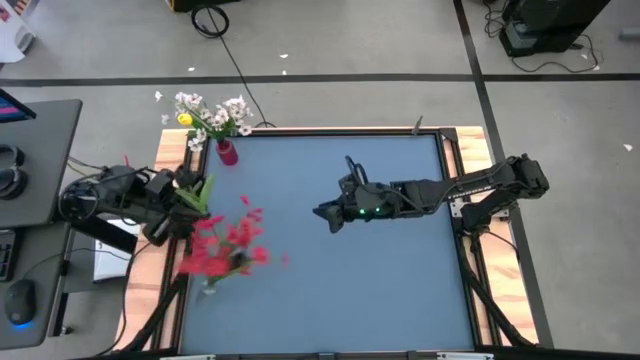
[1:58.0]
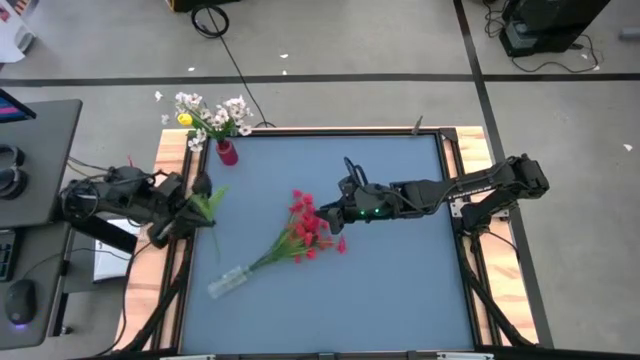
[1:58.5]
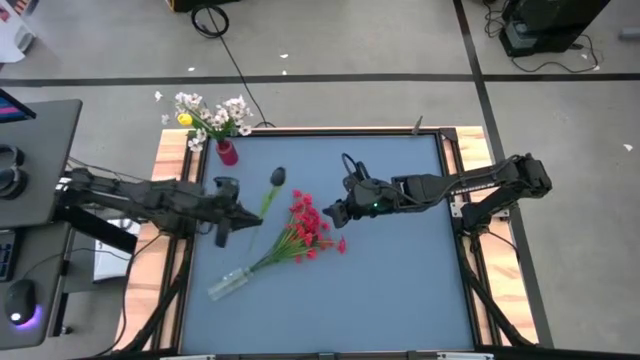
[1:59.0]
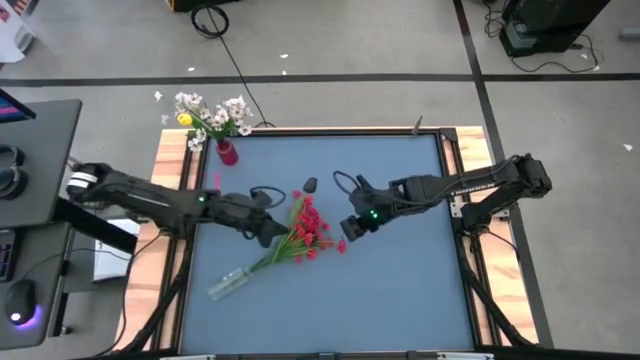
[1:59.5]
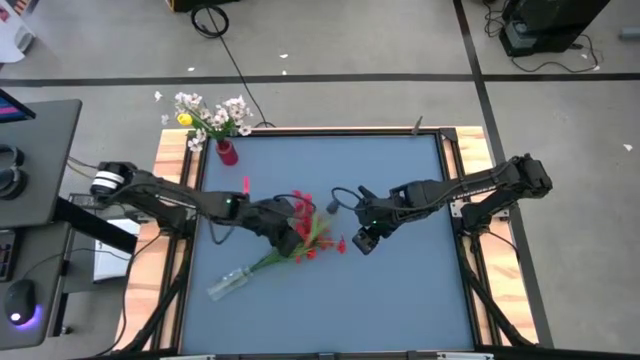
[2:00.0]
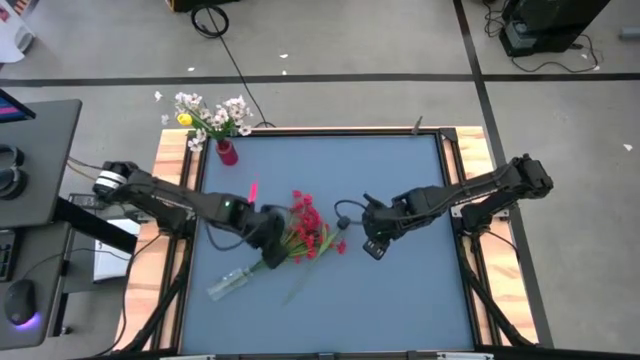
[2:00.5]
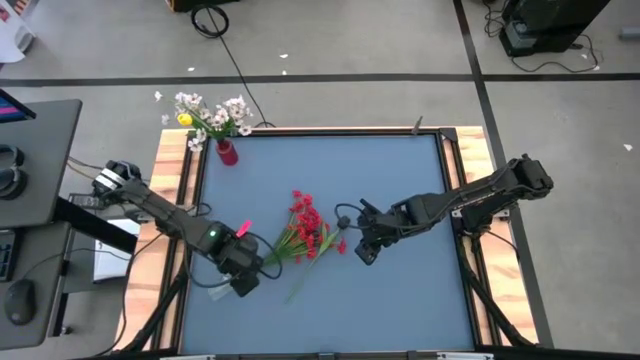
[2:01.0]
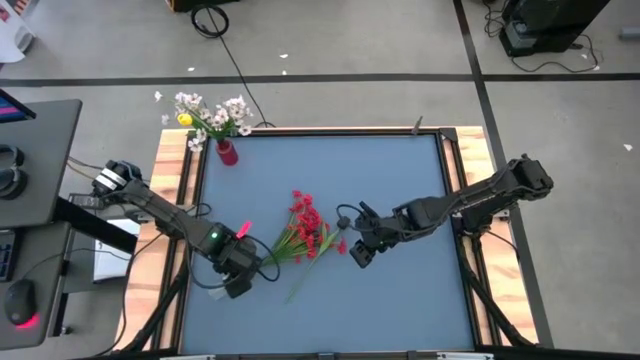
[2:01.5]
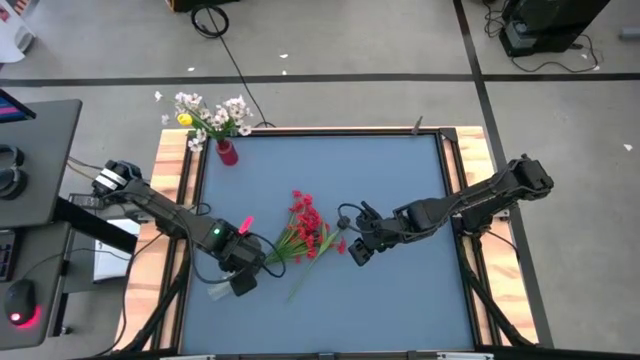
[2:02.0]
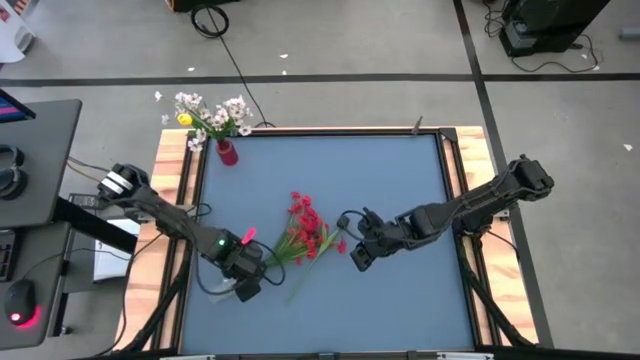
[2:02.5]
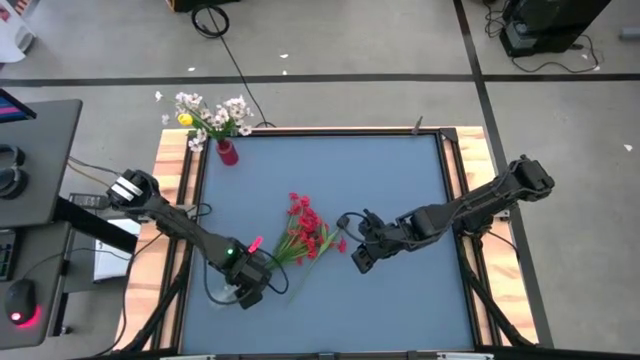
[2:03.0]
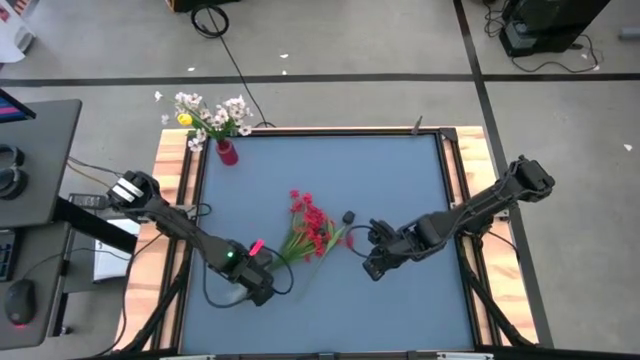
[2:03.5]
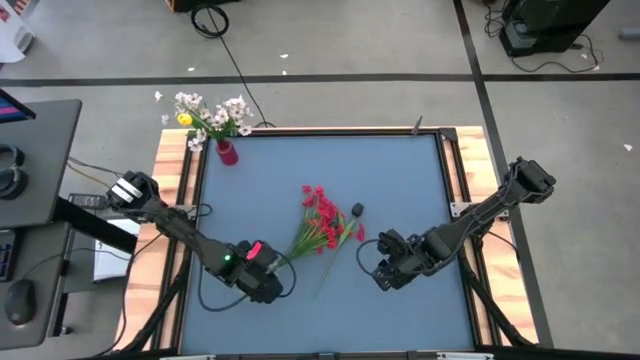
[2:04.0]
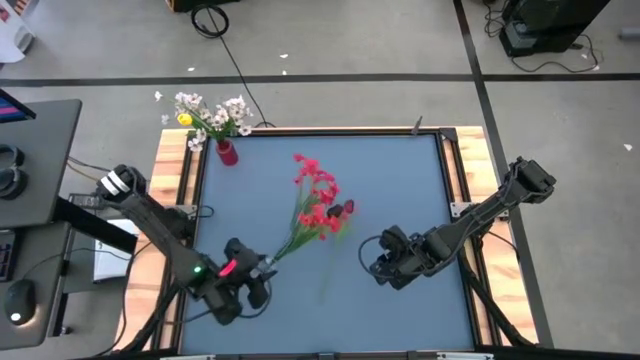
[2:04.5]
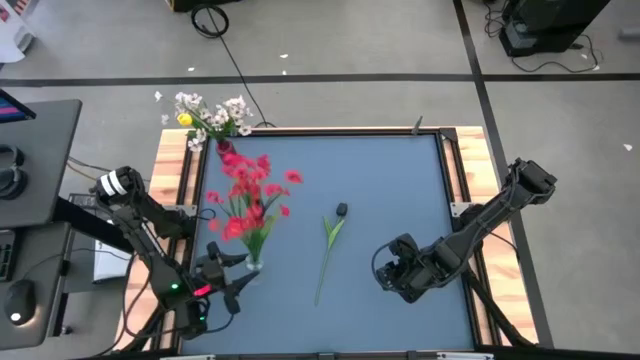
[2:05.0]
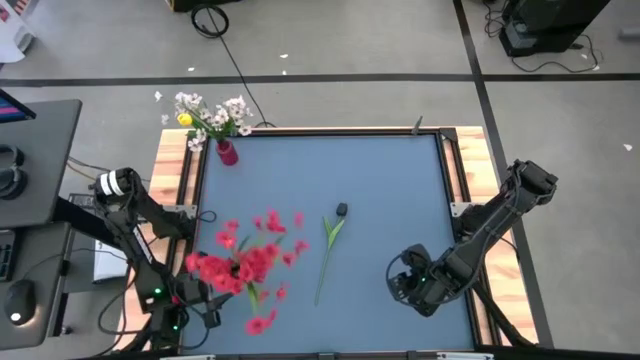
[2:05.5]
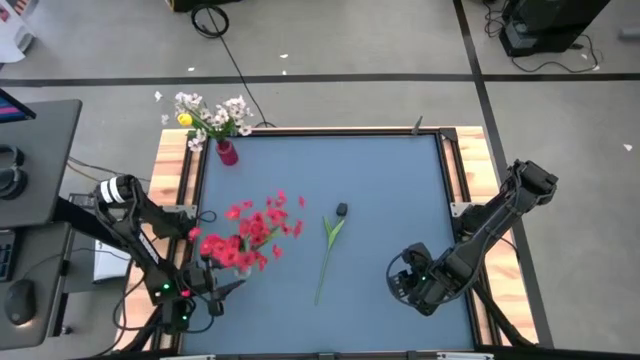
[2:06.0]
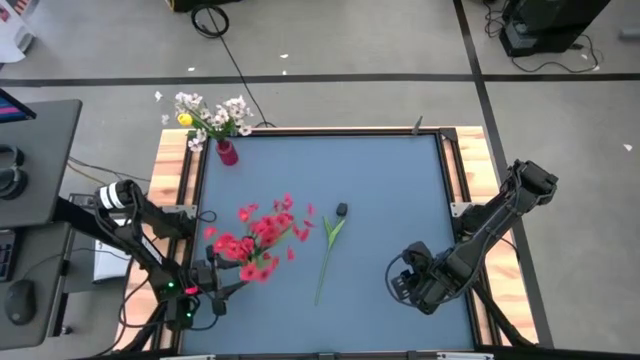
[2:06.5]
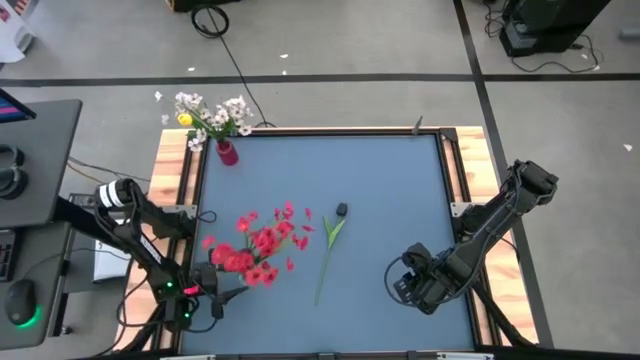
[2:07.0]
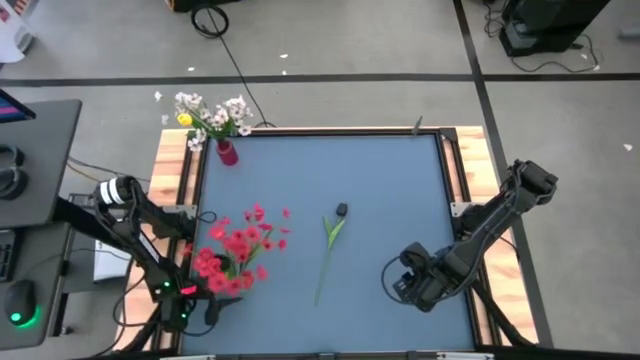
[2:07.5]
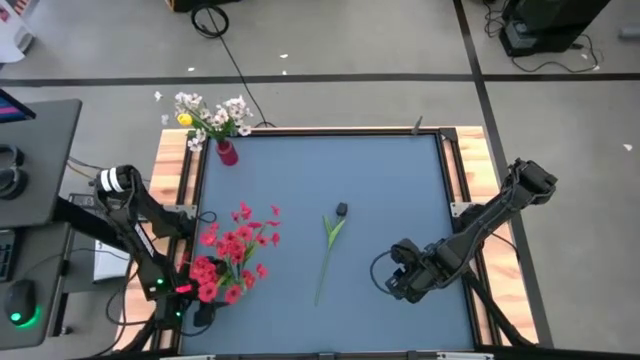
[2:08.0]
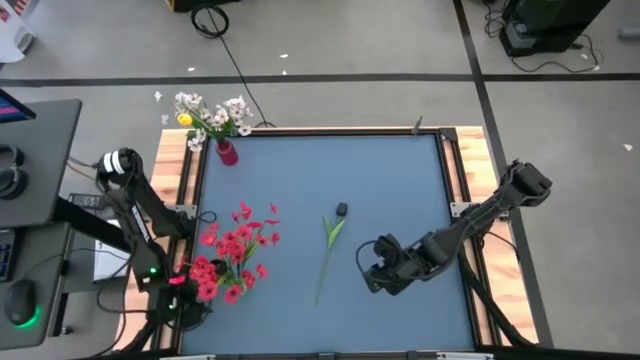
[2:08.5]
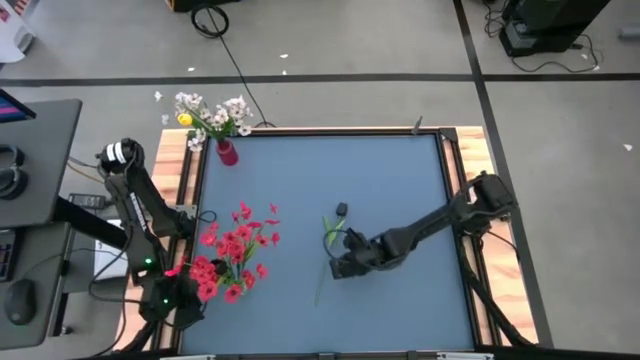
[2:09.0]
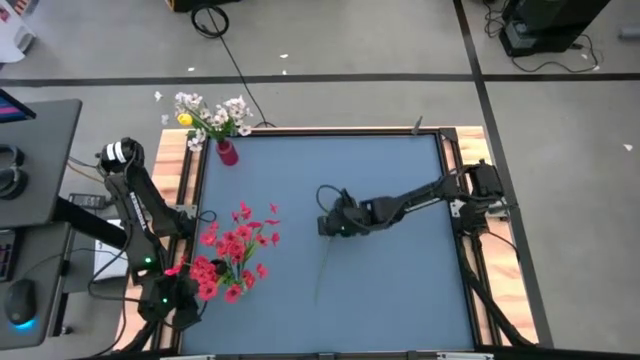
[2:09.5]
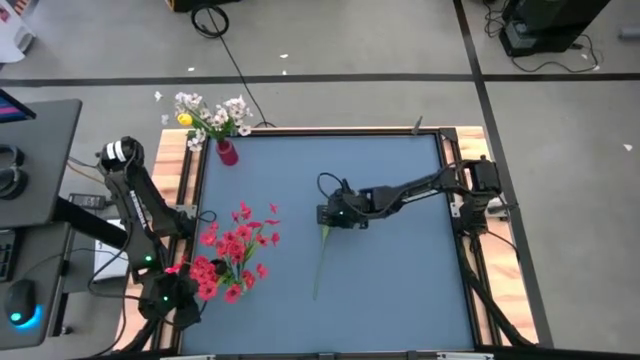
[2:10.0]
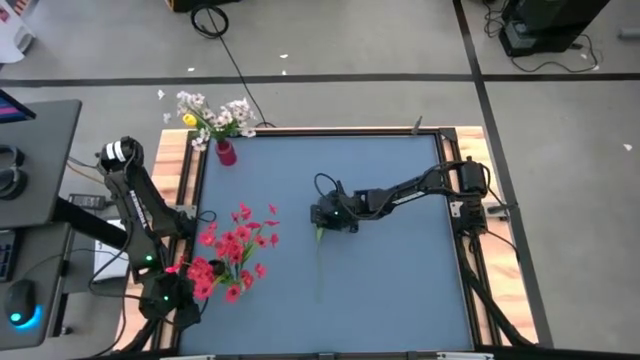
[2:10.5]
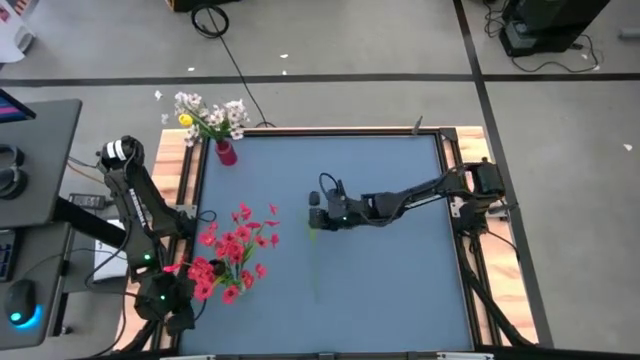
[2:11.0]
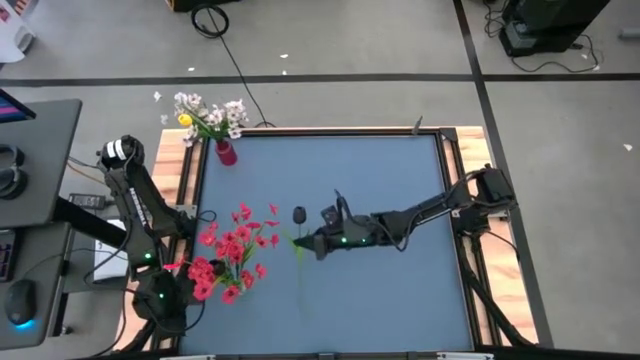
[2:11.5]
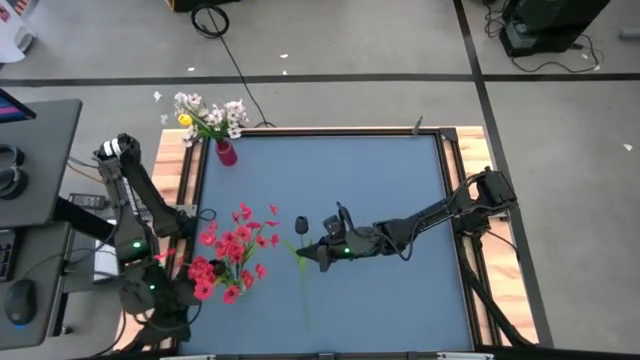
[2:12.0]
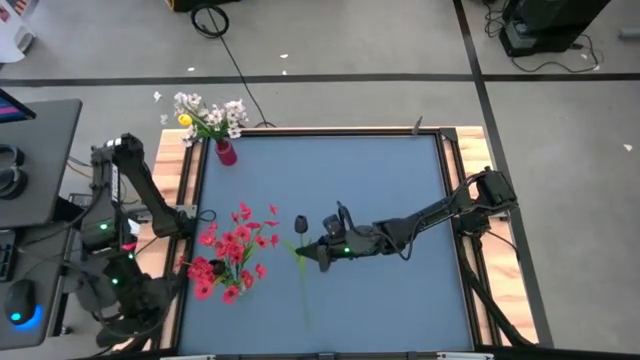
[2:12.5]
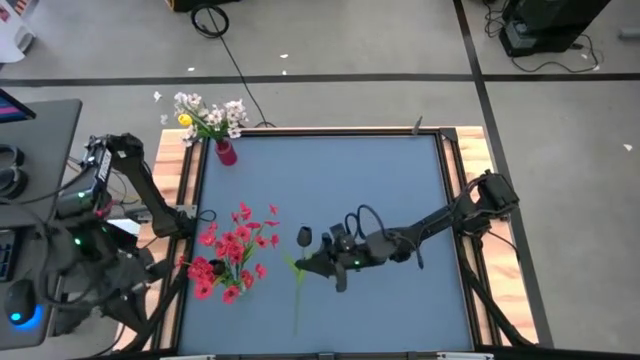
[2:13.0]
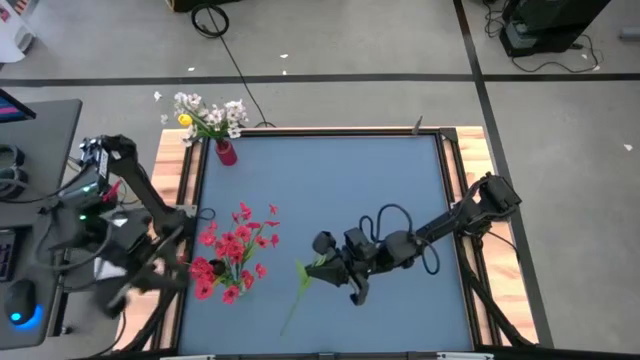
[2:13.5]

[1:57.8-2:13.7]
Task: Sort flowers into vase by color
Put the black flower into the transparent vase

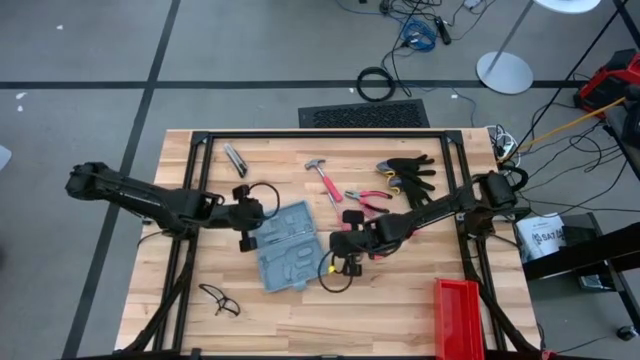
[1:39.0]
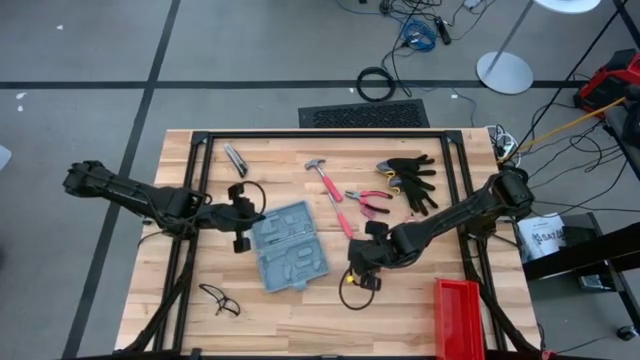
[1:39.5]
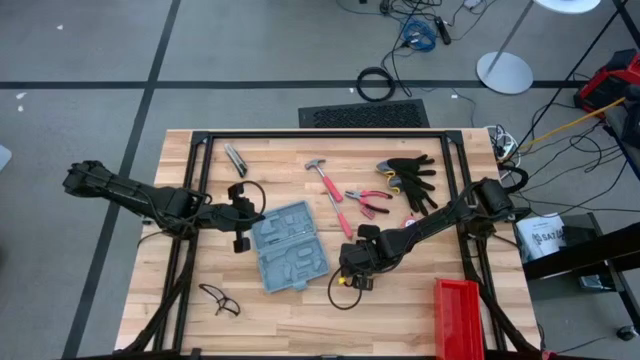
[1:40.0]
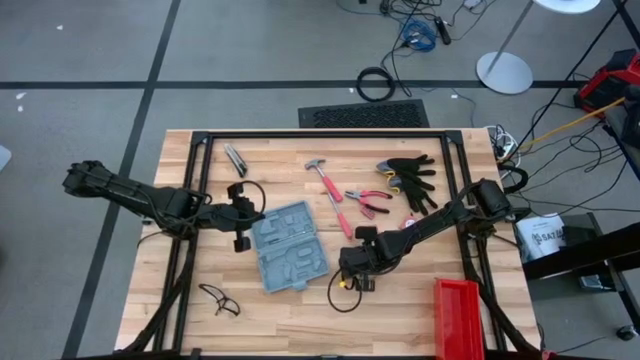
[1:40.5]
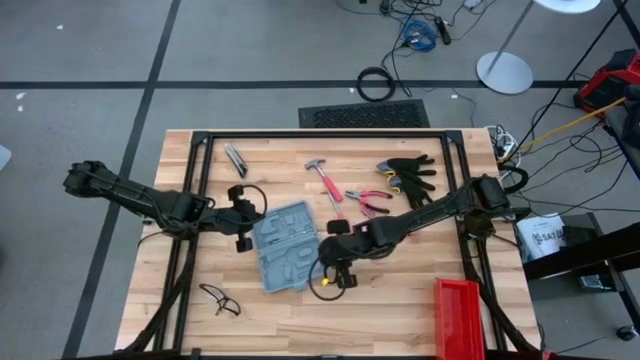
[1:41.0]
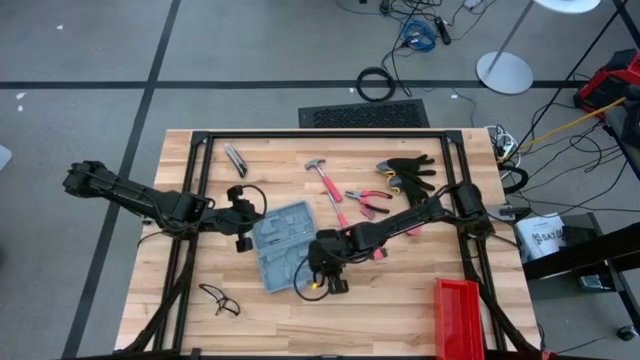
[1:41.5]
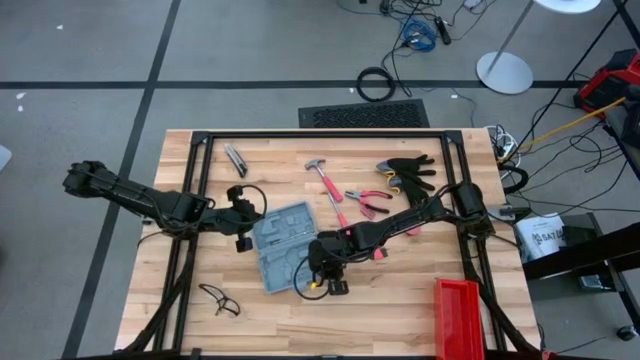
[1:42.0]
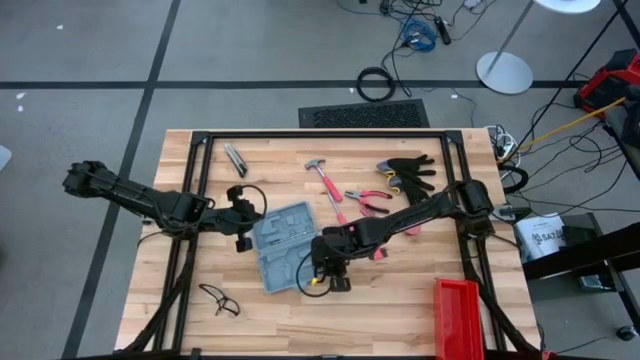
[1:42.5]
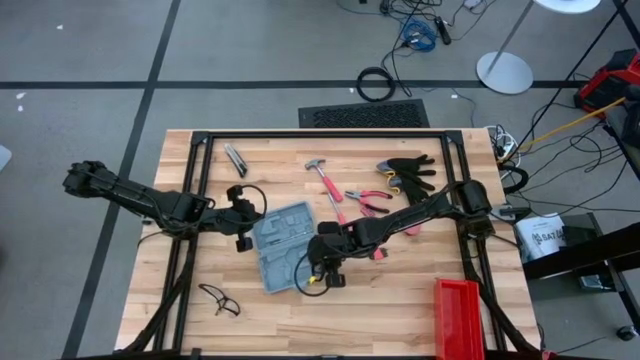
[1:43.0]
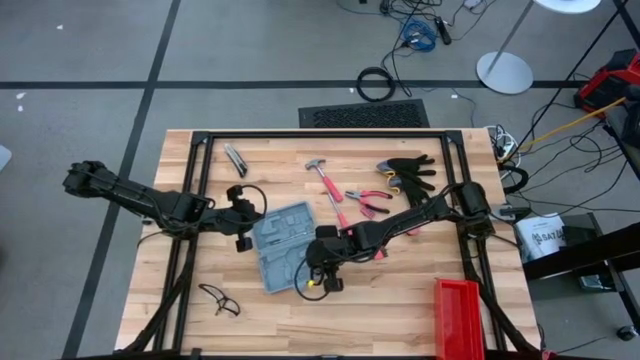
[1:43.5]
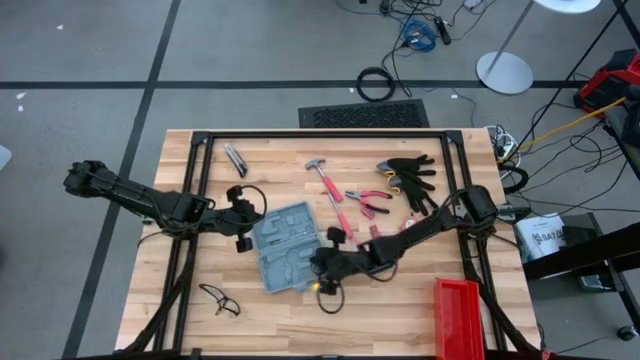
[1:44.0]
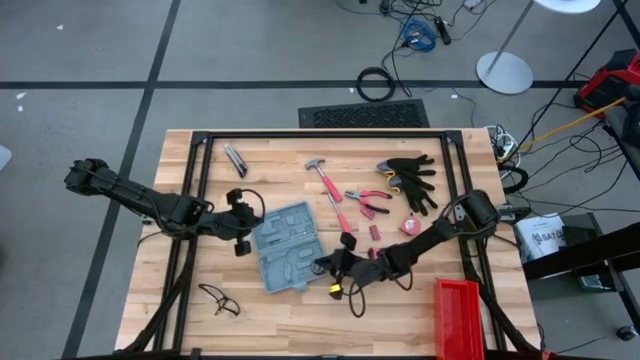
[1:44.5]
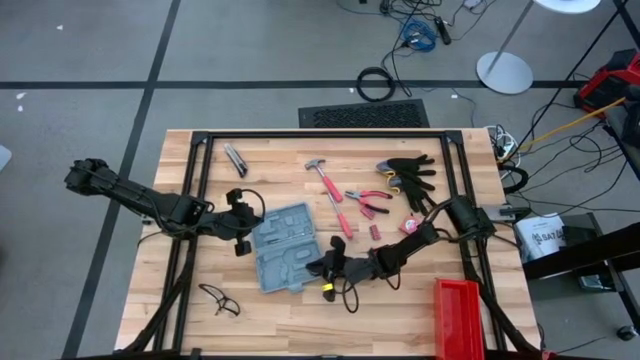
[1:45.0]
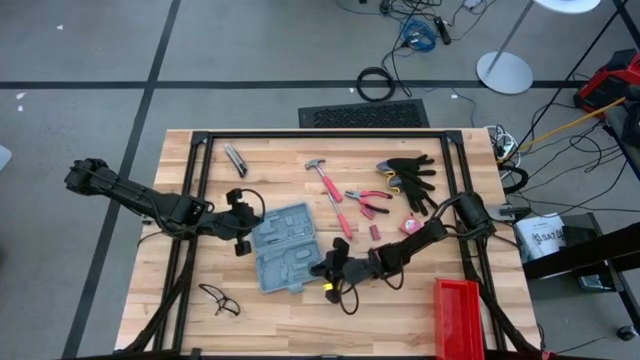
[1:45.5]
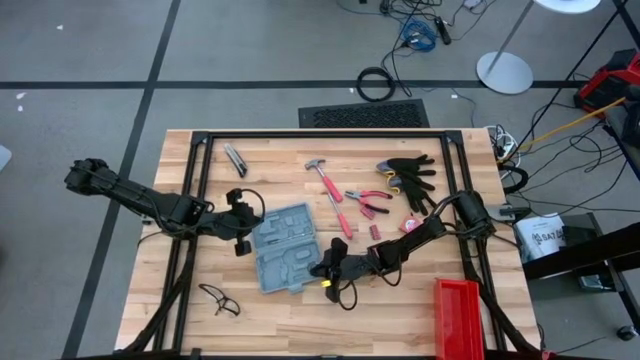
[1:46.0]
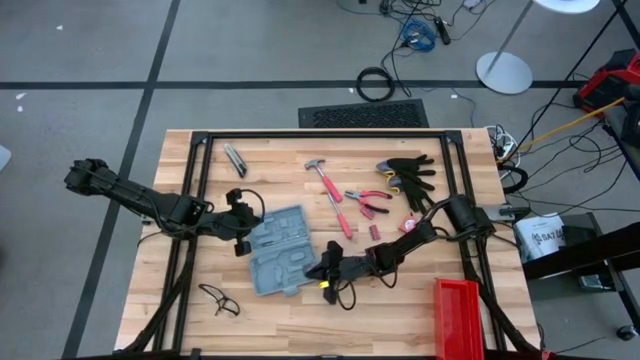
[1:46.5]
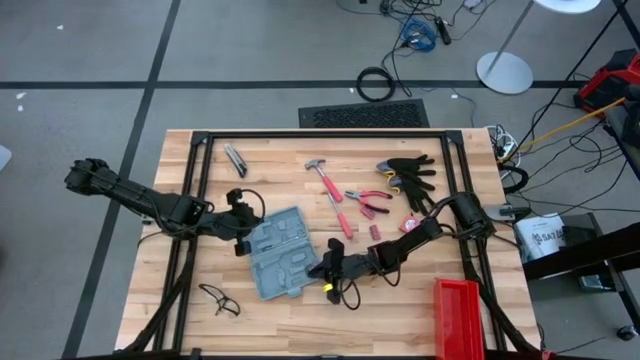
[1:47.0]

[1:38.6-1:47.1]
Task: prefit tool cases
Put the pink electrical tape into the gray prefit tool case
